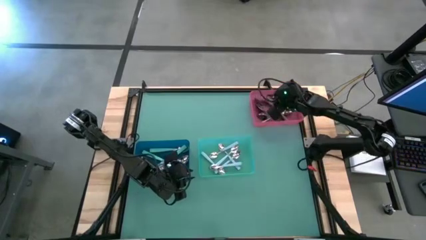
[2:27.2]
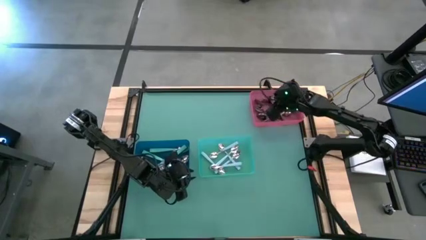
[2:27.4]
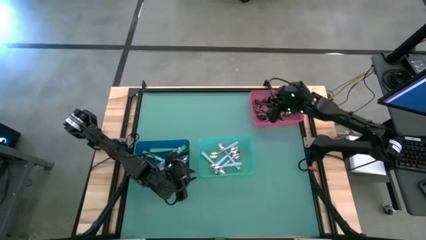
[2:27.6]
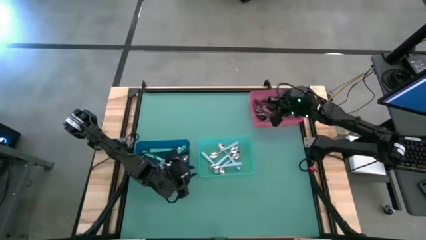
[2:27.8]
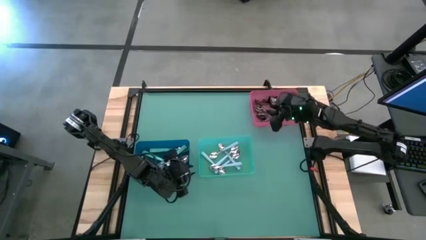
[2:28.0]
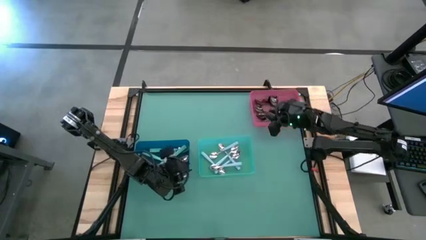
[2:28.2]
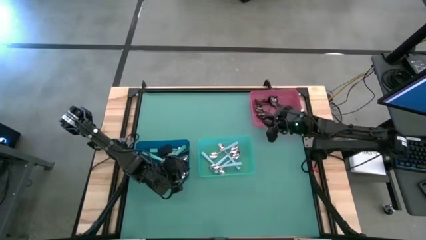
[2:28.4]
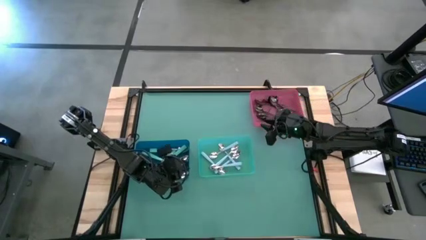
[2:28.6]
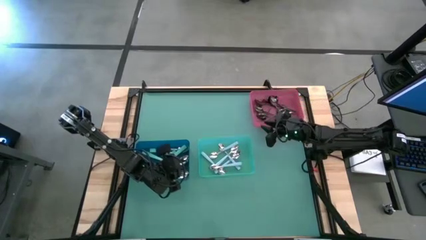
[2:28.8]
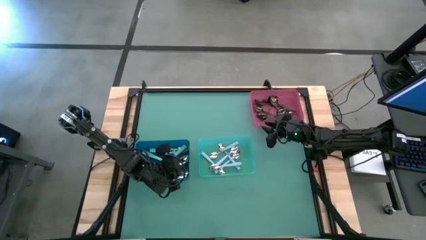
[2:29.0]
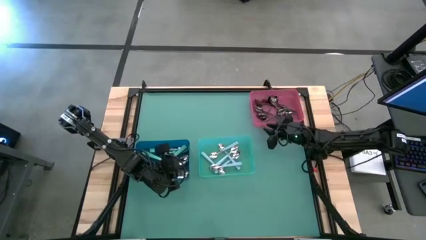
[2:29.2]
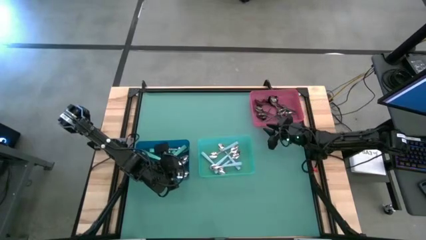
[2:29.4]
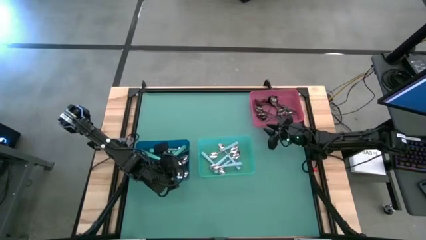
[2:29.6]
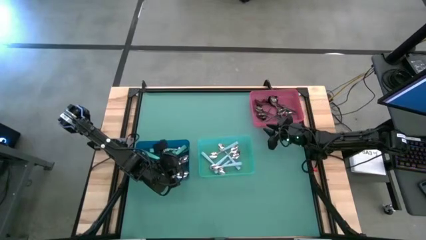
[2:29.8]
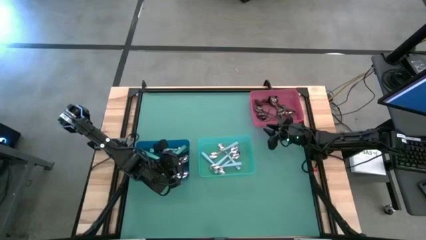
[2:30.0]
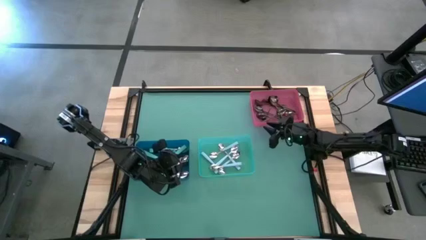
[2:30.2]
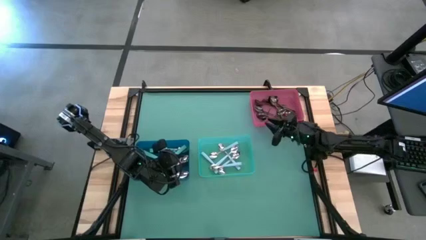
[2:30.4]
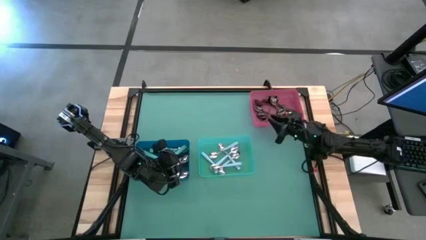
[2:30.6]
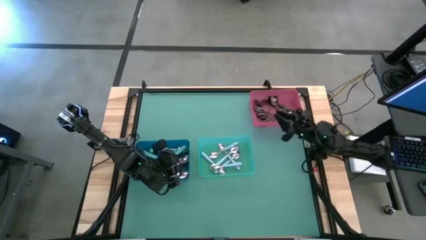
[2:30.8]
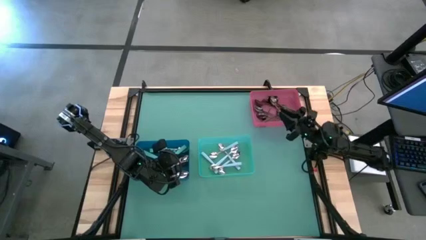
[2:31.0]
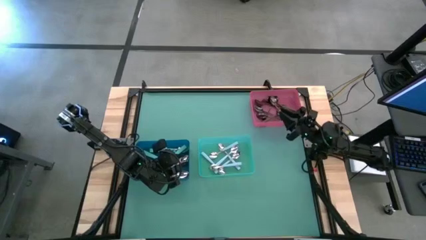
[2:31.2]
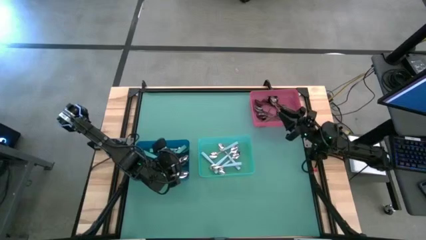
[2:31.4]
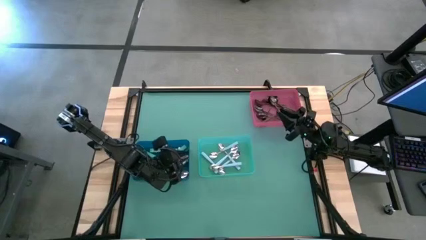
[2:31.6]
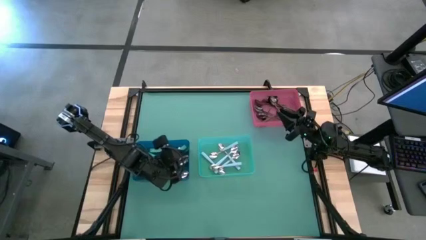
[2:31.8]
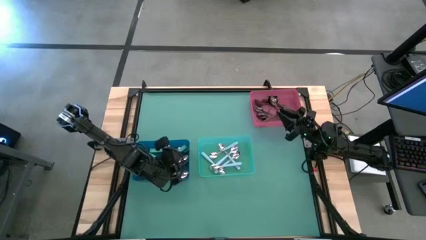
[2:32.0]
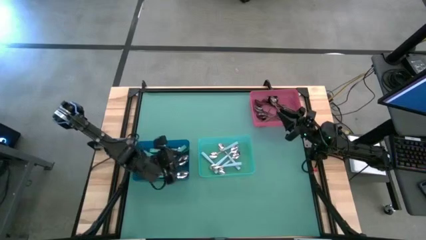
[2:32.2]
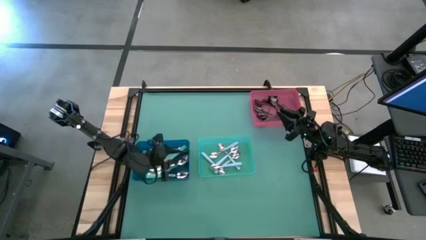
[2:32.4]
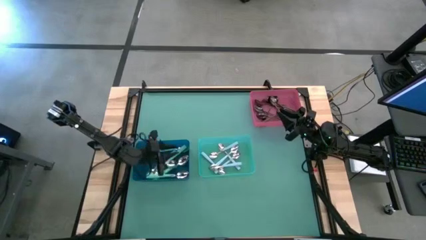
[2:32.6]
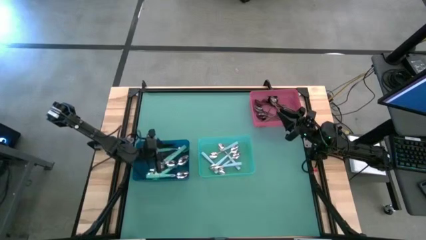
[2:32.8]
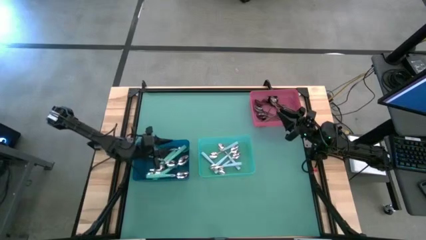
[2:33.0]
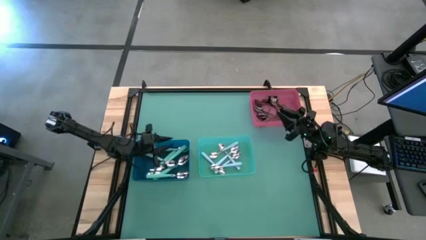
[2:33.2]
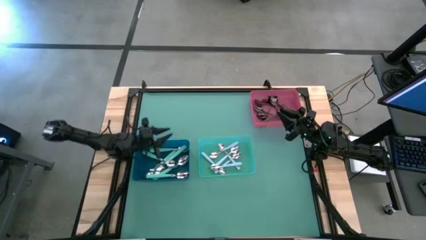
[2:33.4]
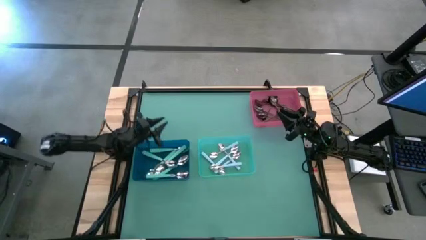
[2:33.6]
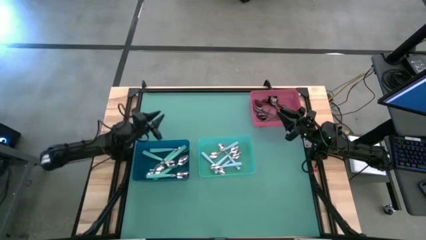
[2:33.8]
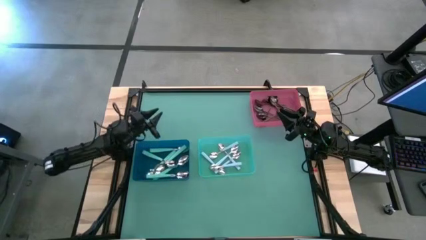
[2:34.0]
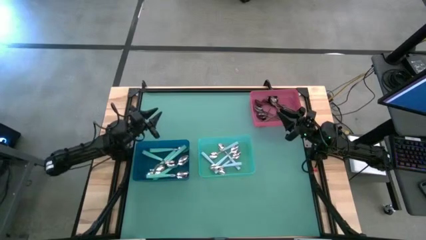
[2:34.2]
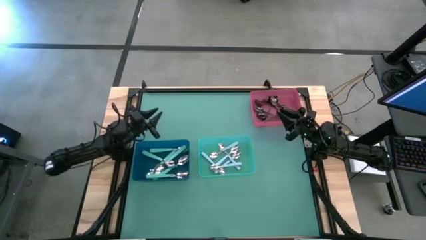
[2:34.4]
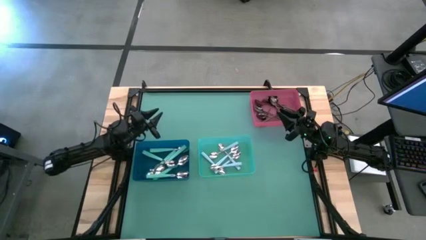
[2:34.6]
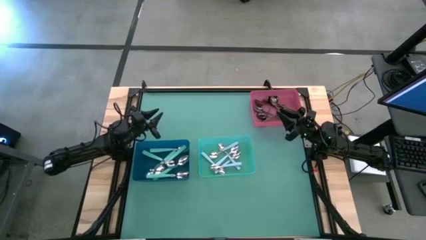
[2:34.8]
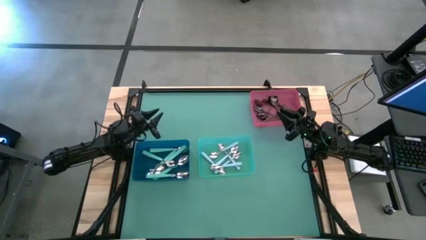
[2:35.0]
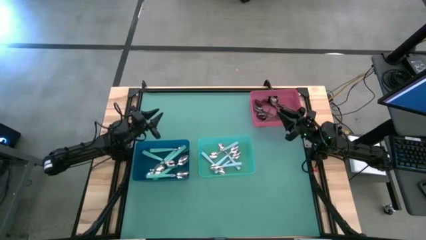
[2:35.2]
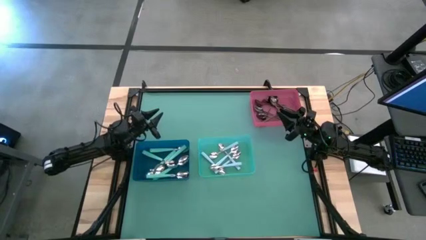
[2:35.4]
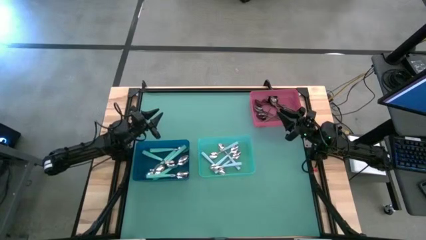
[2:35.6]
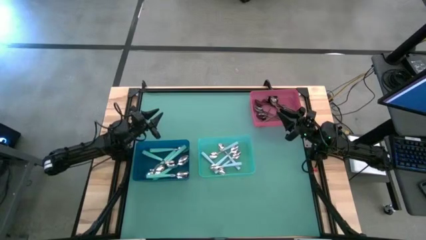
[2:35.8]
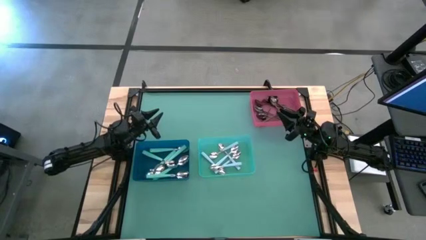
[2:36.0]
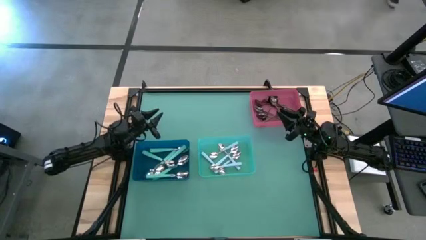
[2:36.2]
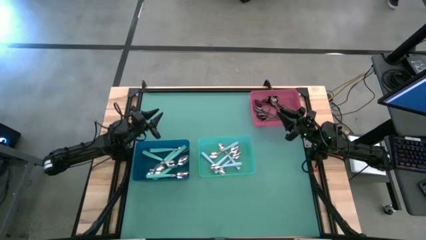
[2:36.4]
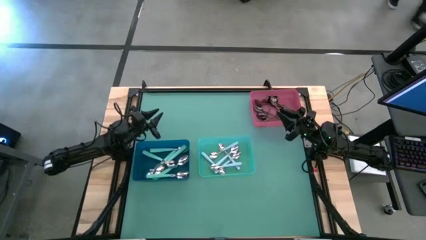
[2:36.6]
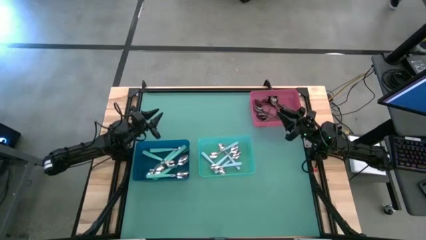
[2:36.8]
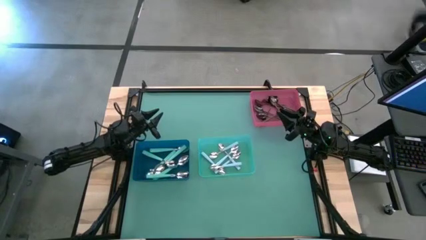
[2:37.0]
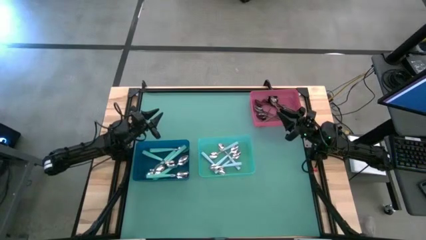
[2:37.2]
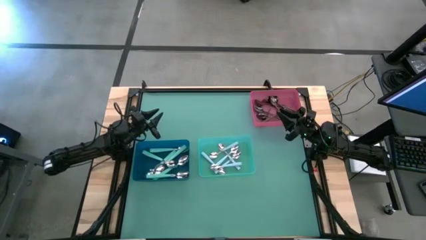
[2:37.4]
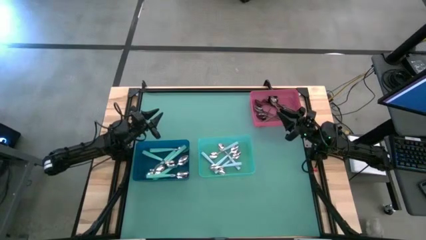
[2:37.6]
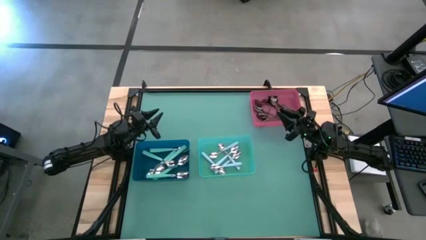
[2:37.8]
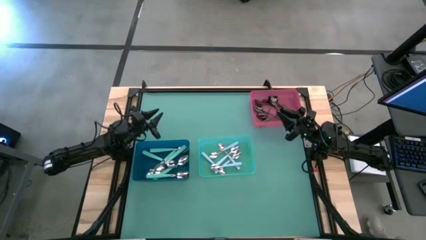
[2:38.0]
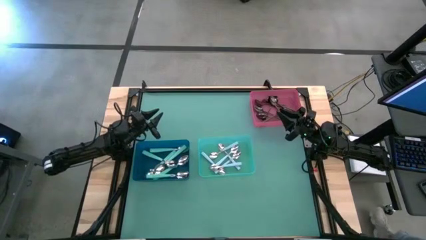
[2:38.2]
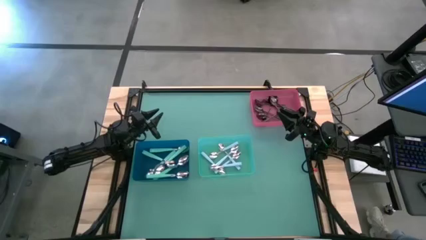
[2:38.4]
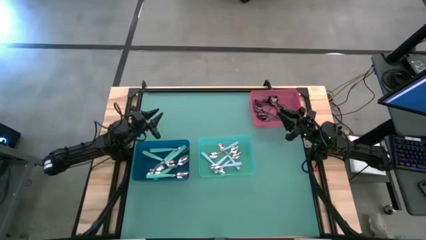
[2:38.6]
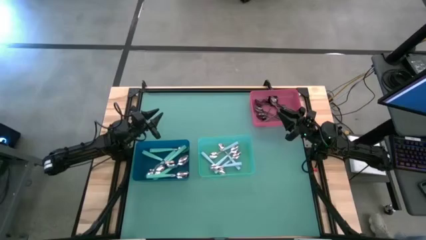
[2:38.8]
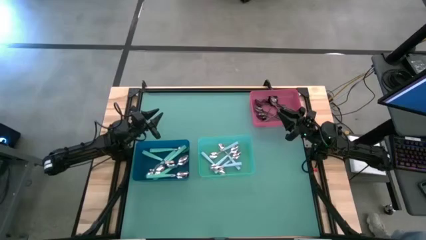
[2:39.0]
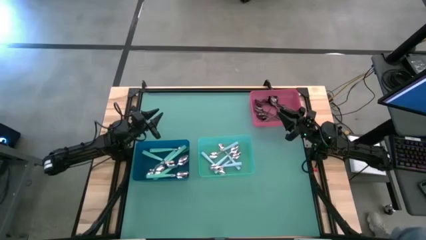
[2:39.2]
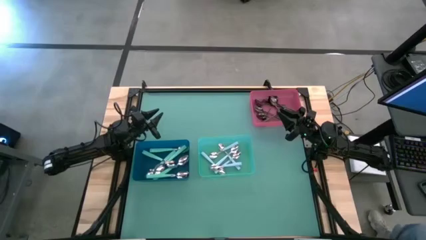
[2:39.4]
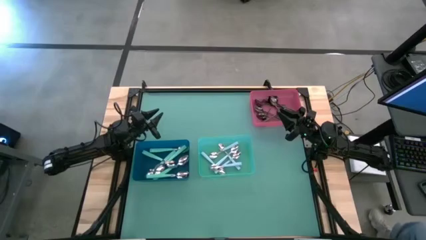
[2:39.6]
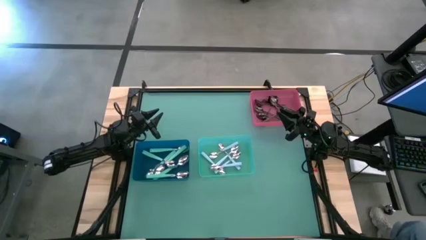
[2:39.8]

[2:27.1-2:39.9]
Task: Sort silverware by color (type)
Return to Home Position

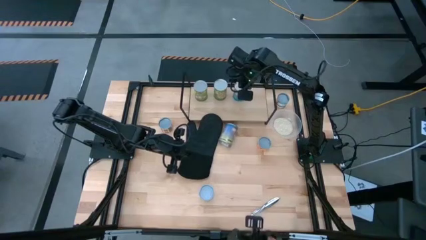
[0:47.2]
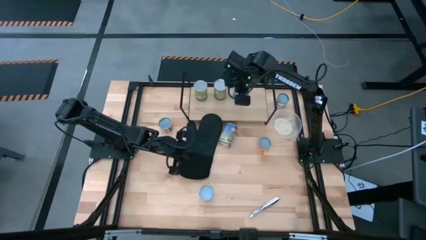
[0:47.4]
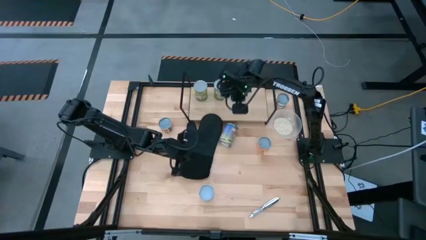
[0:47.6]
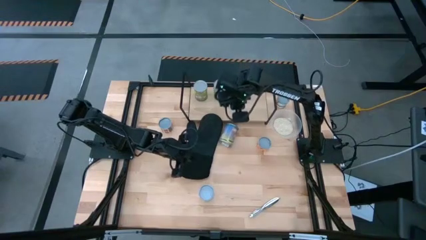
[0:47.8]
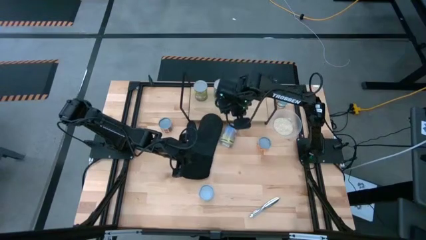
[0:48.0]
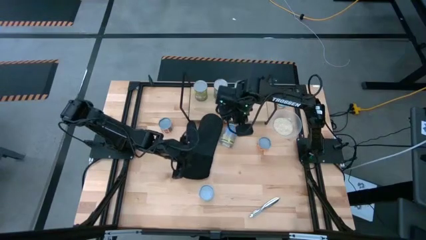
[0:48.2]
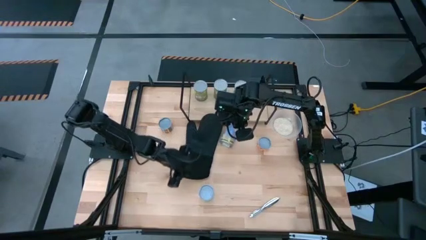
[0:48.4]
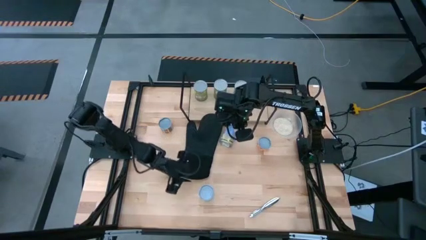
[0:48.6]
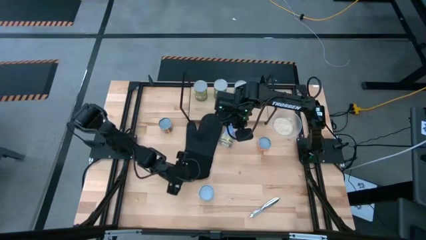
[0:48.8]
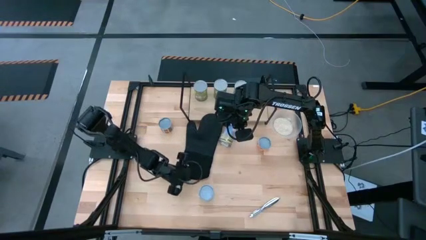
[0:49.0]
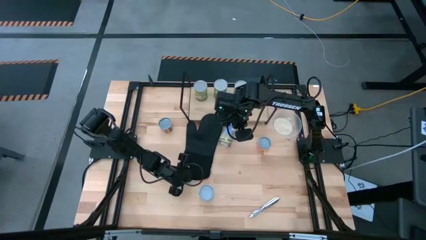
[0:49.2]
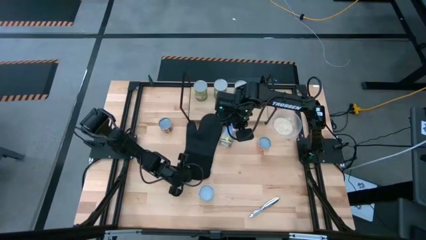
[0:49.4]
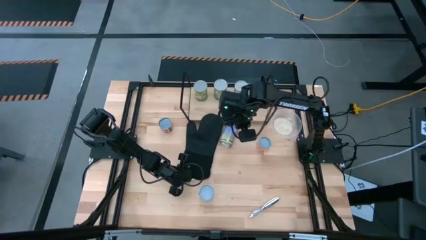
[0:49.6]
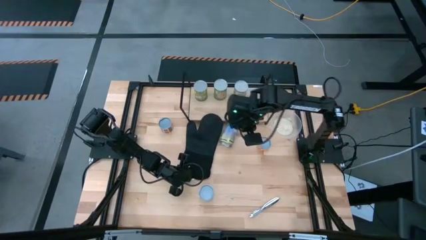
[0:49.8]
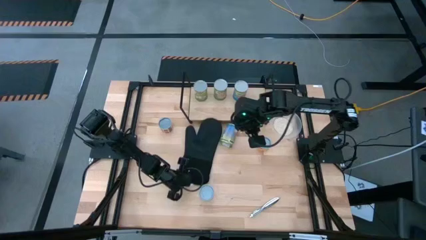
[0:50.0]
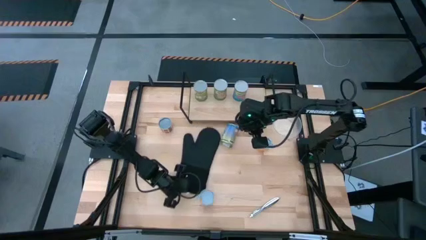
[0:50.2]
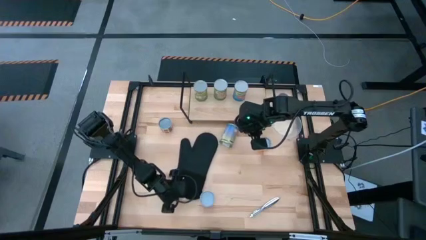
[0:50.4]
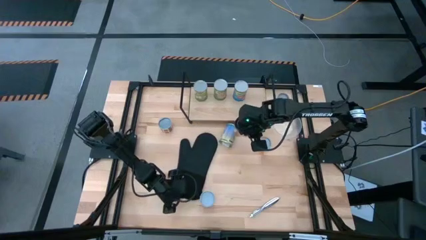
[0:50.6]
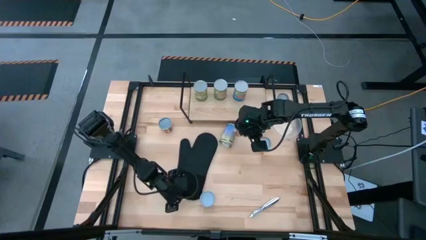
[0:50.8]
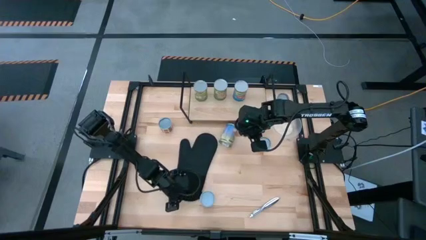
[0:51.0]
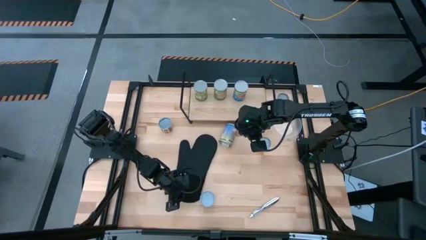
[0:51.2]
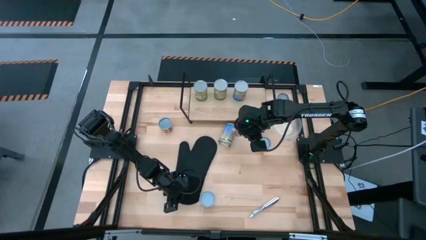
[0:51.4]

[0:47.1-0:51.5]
Task: Pick and place cans onto a shelf
Adjust the black glove
